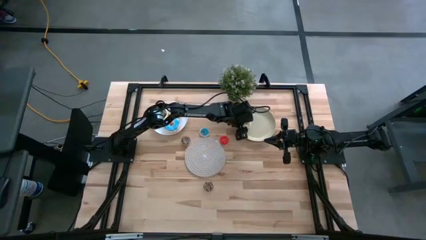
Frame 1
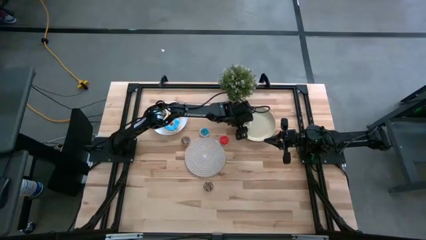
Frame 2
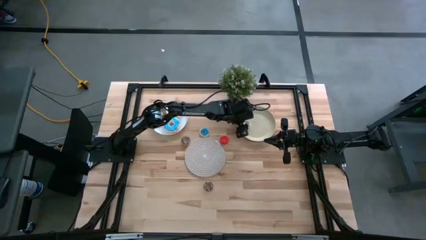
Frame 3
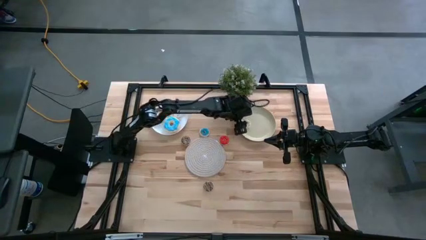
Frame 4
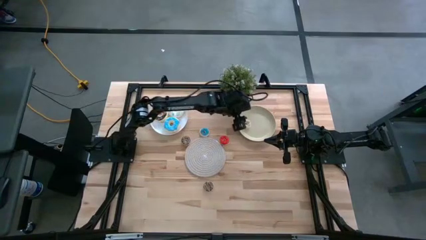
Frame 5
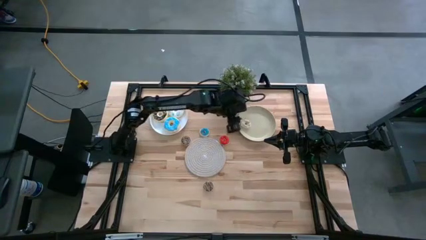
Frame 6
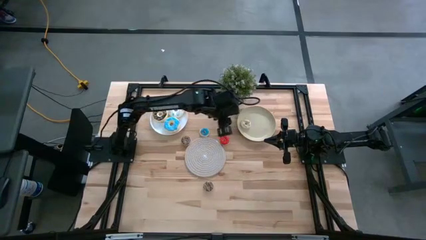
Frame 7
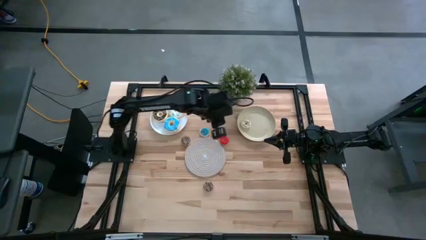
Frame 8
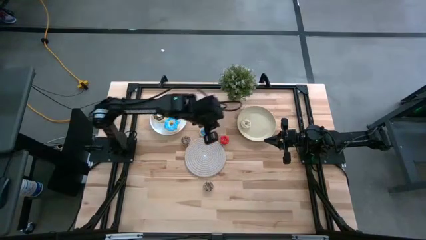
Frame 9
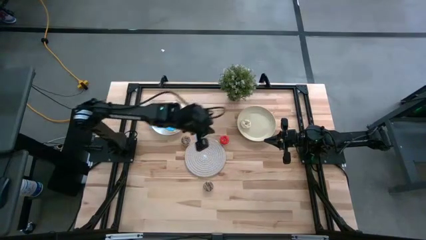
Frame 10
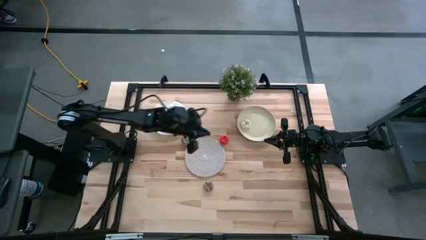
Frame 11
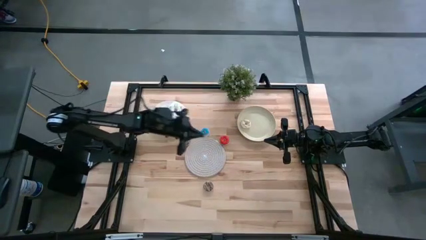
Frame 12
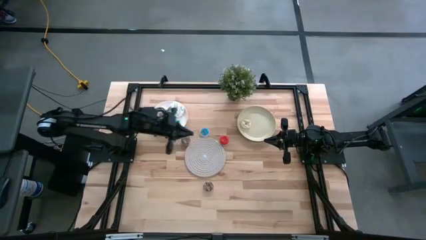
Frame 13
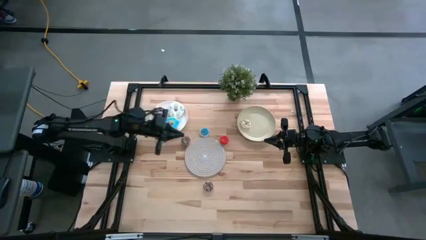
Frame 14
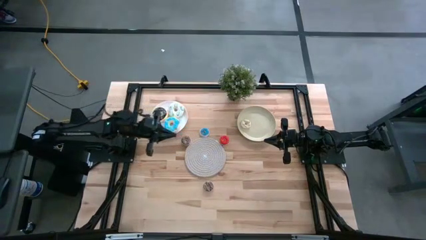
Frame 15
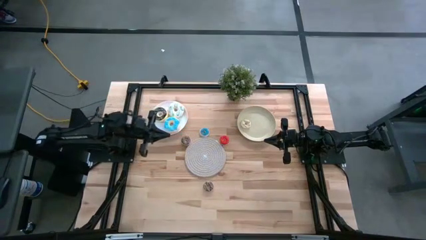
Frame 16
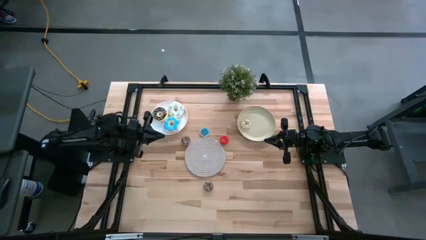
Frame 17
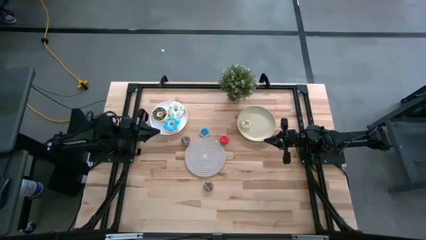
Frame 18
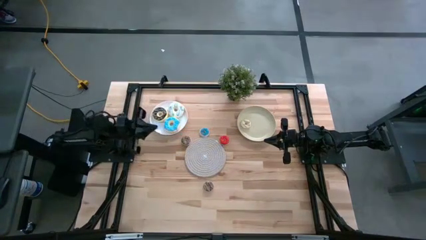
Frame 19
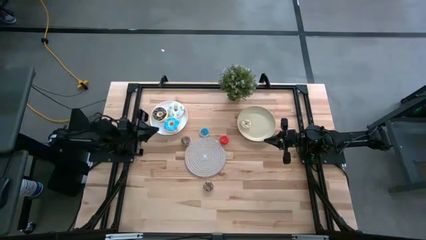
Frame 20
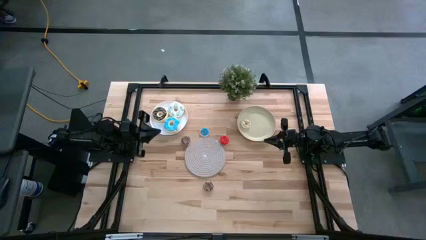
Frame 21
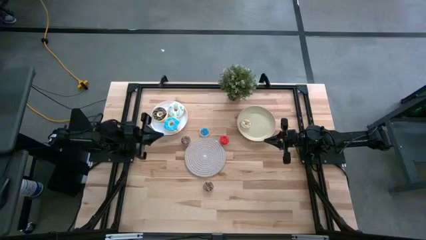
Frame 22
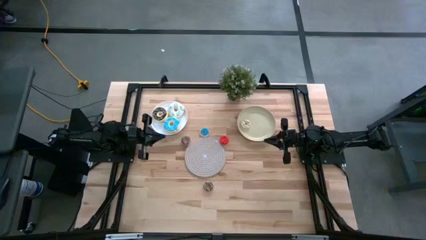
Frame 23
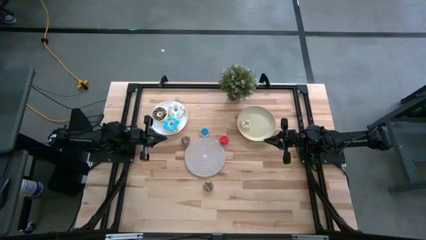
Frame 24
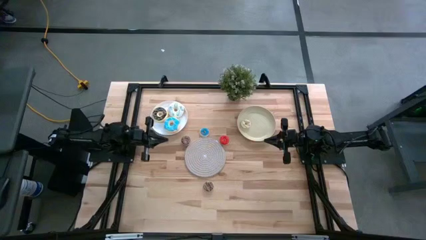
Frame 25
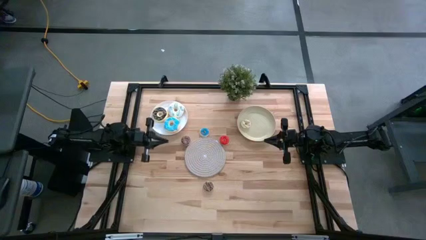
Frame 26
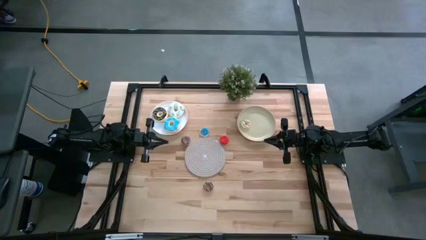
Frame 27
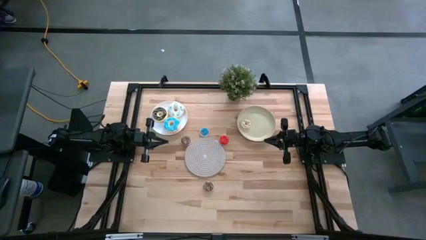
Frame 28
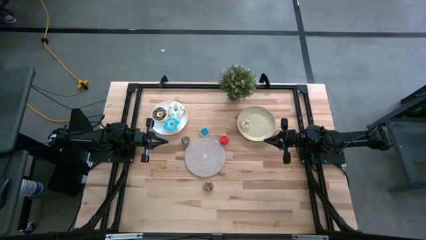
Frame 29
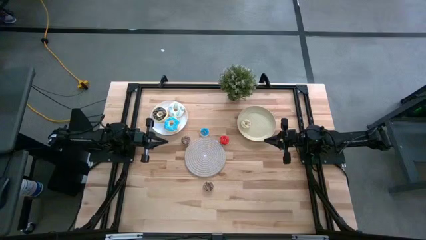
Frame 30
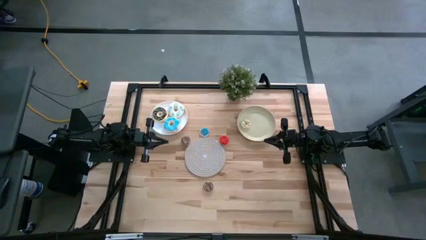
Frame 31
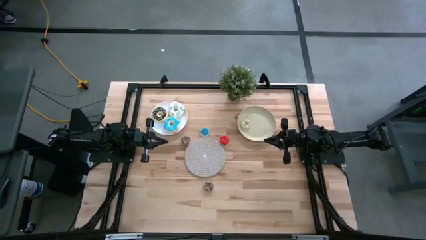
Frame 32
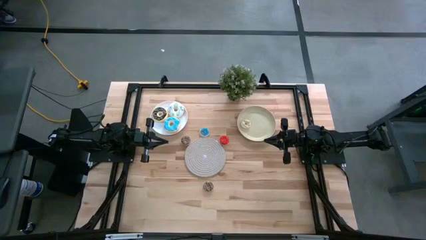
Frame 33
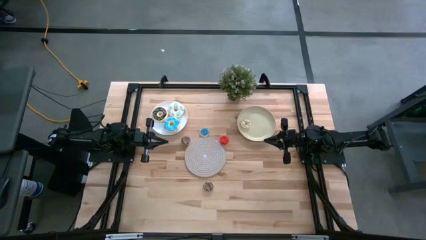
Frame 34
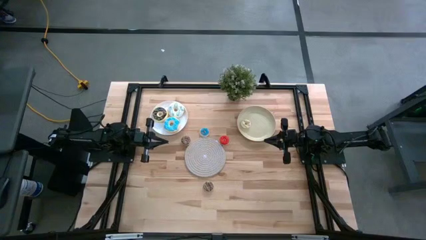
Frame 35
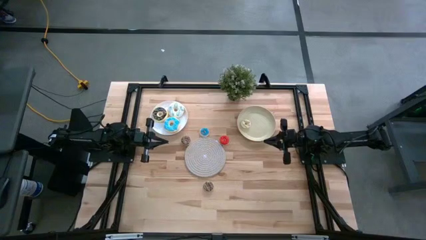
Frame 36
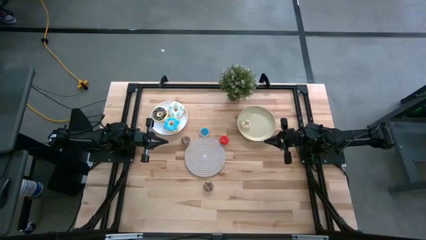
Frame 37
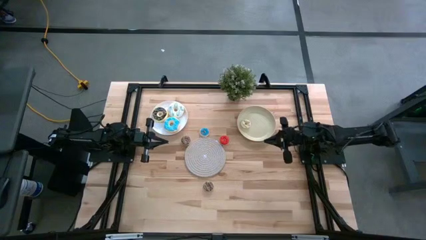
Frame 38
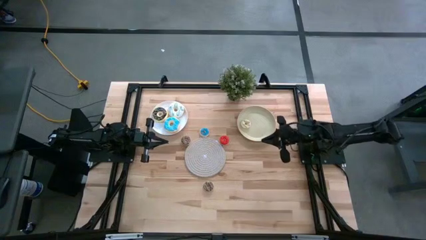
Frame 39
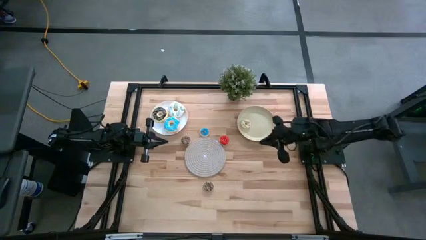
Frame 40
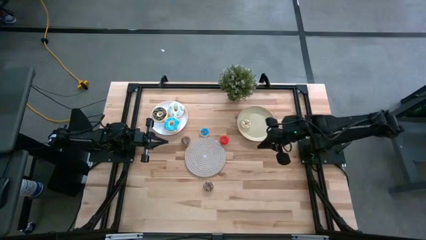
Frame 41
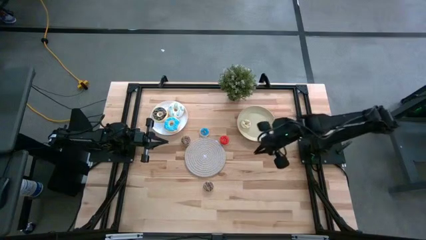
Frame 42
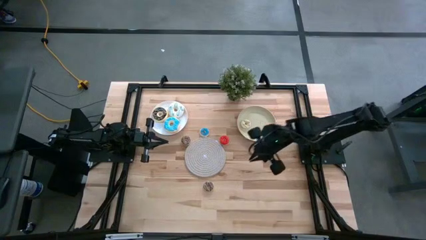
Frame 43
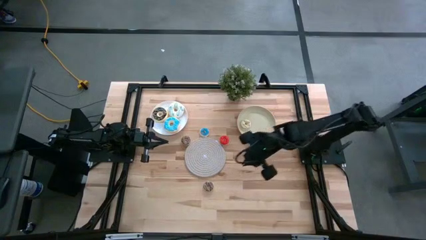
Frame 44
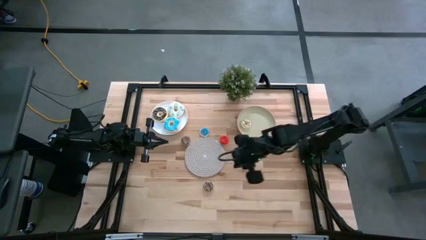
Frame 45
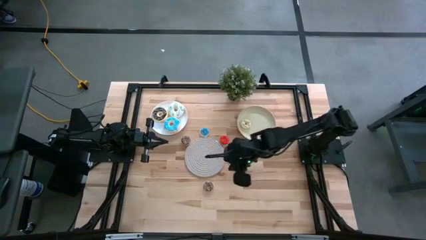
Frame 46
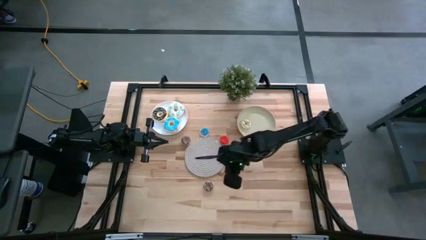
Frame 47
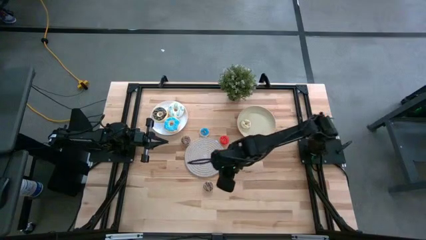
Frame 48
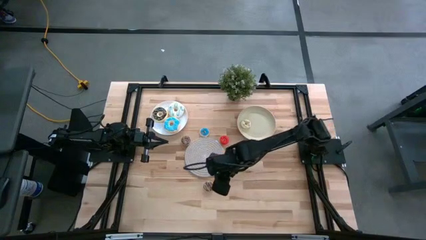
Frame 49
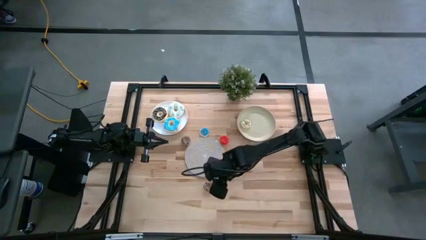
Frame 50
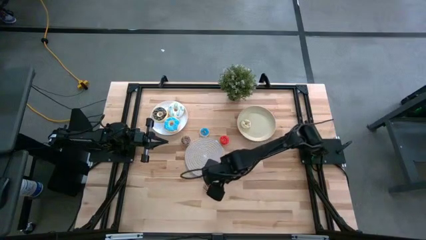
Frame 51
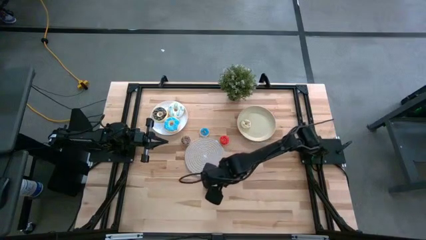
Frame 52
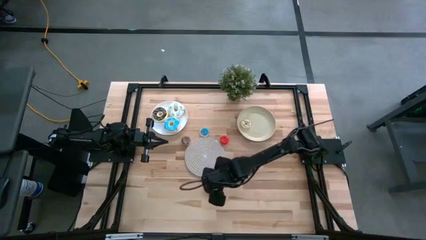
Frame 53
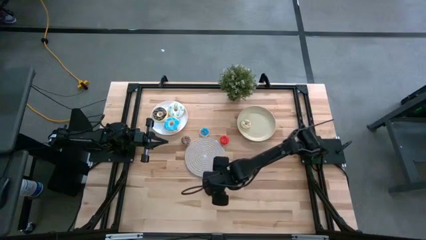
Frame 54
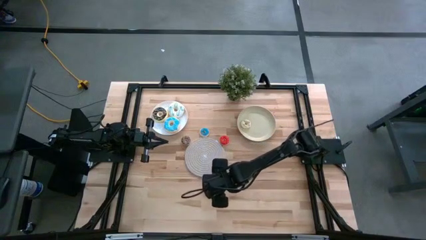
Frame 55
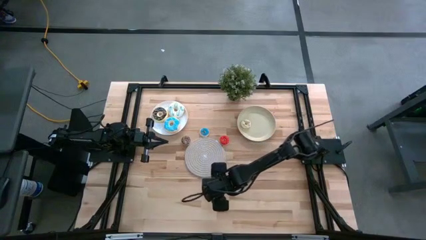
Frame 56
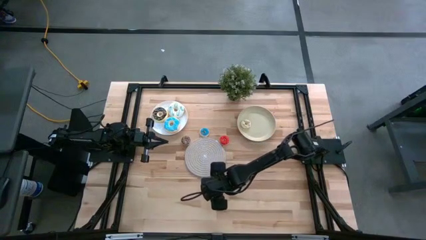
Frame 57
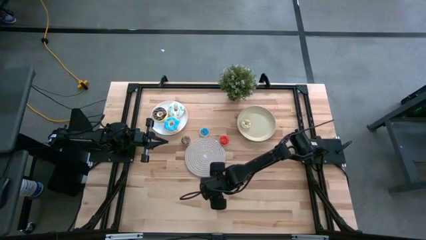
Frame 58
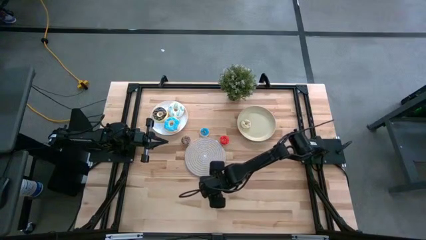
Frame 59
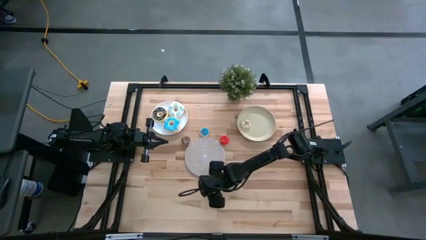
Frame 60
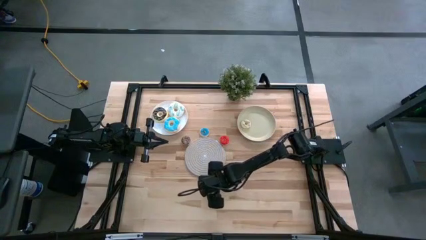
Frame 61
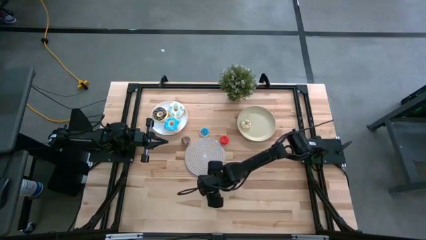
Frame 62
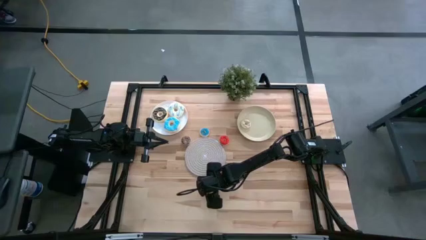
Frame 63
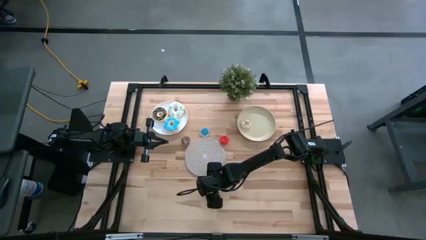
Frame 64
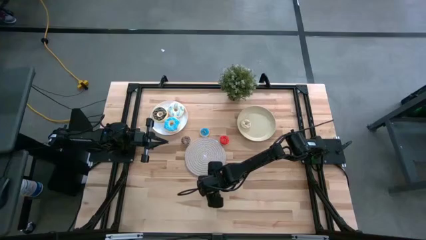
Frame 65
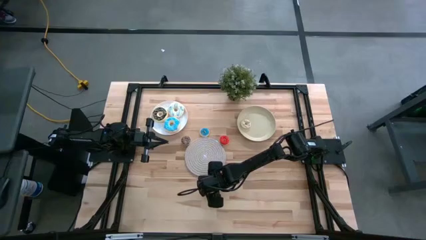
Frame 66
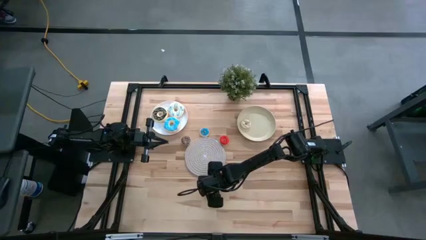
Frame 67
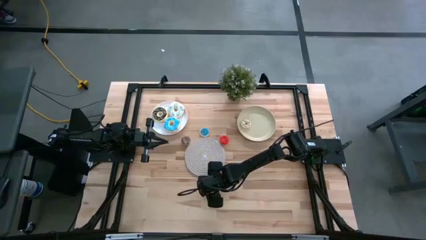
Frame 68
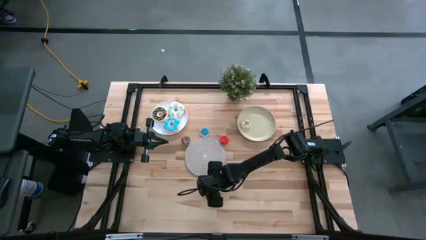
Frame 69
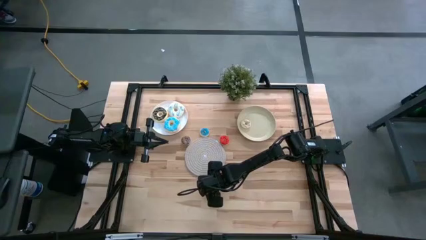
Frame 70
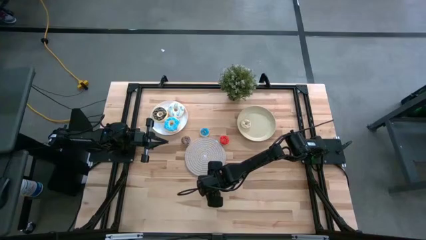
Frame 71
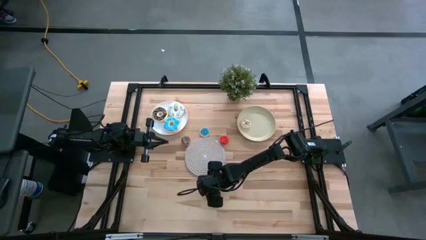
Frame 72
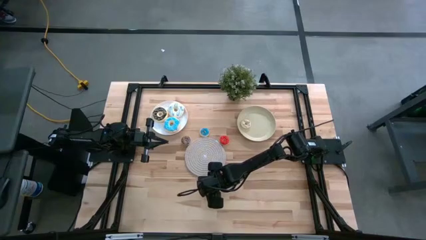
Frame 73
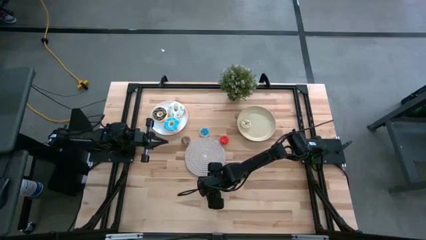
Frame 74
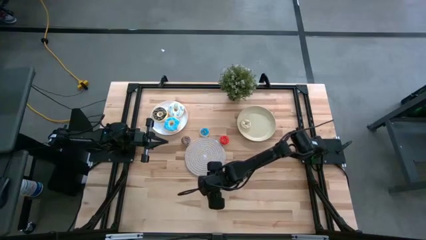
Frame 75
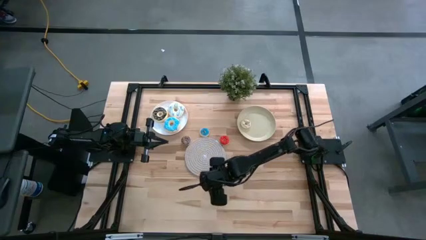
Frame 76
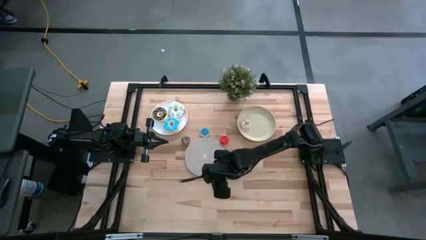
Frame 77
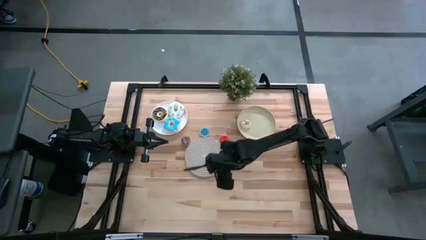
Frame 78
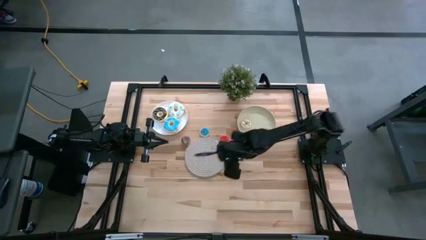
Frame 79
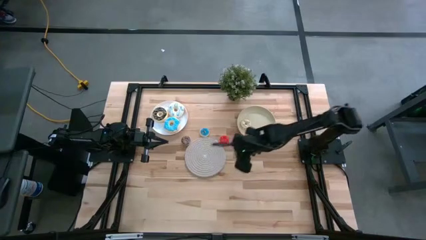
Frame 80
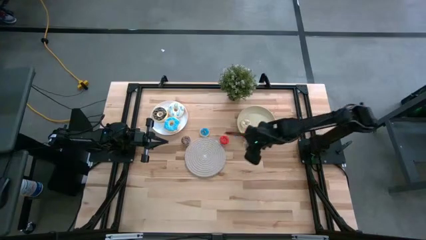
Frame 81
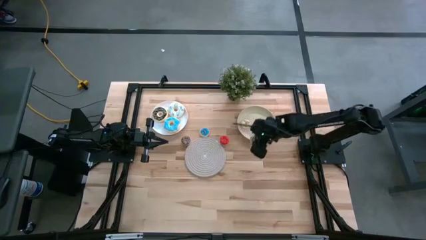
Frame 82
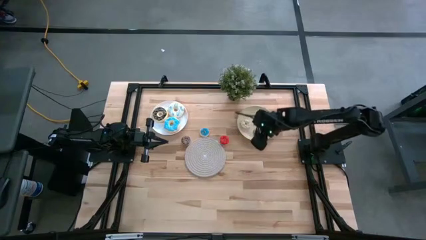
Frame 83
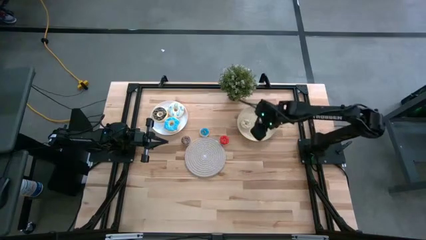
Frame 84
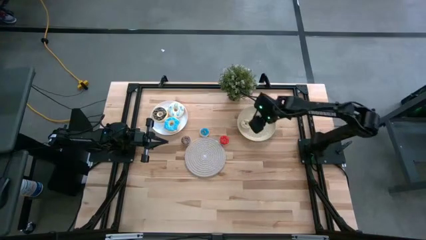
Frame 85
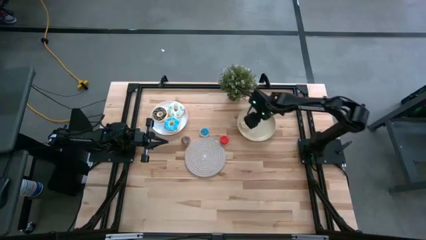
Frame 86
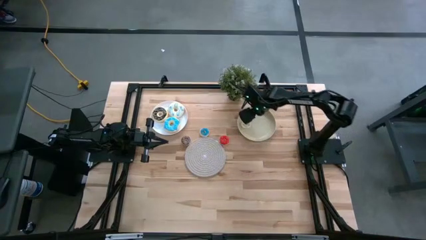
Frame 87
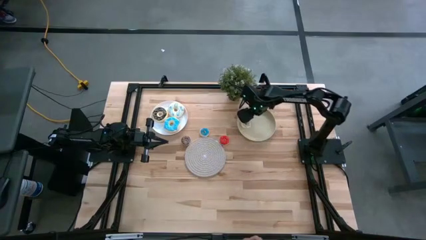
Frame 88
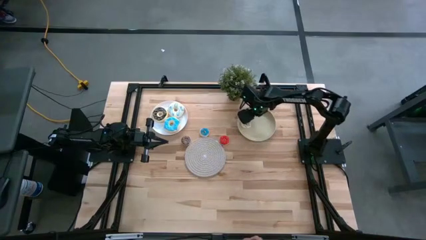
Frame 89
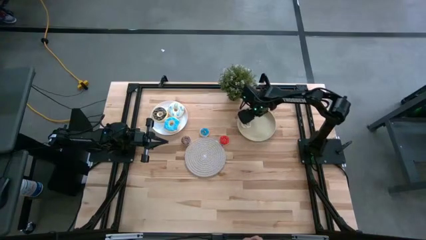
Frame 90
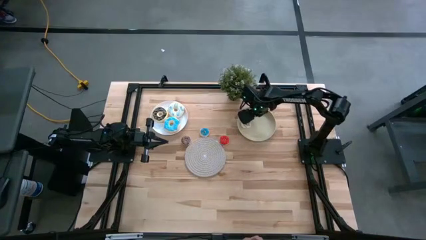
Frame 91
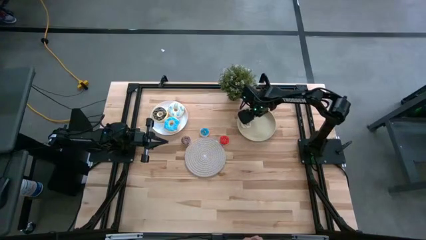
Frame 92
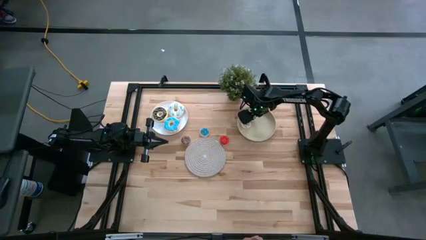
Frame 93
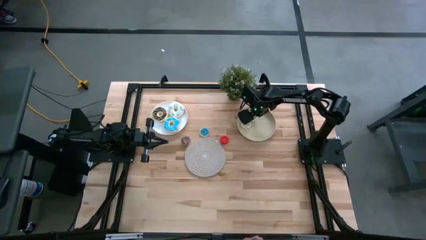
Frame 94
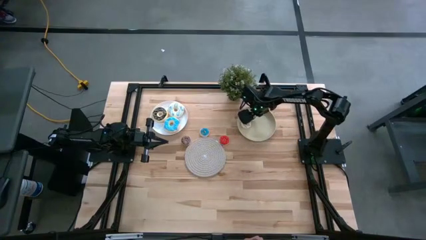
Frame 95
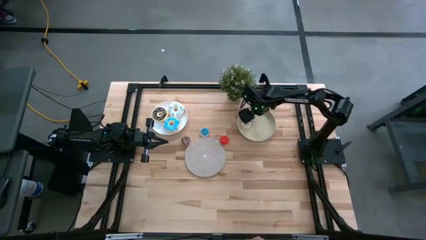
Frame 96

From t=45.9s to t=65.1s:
Task: Pick & Place donuts
Put the small bottom brown donut on the brown plate
